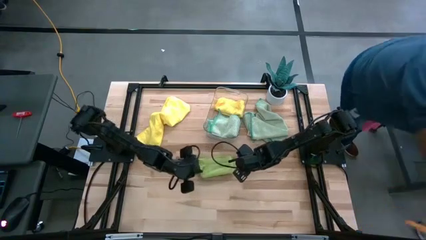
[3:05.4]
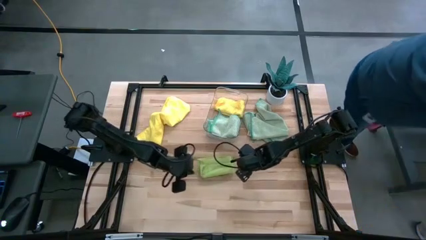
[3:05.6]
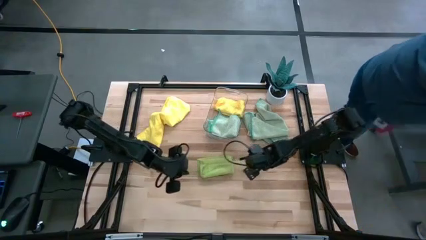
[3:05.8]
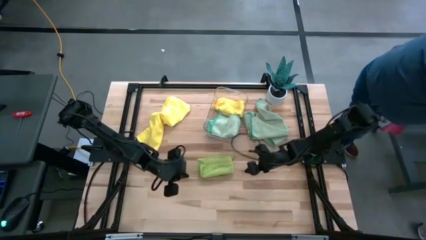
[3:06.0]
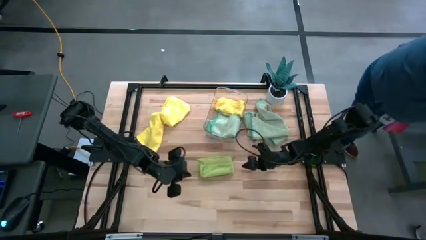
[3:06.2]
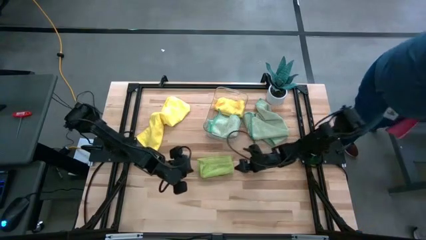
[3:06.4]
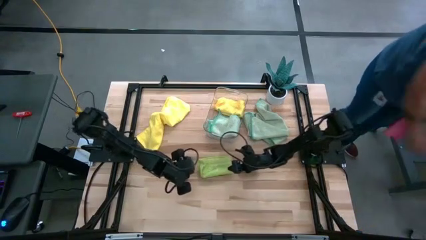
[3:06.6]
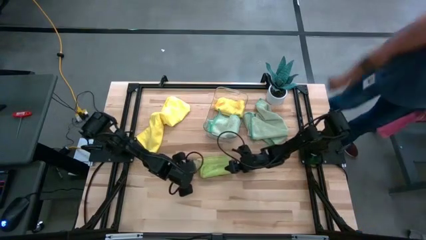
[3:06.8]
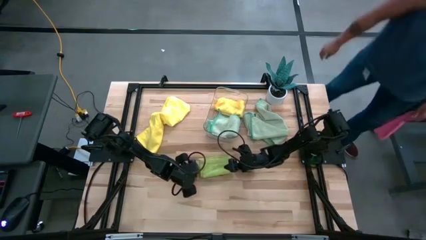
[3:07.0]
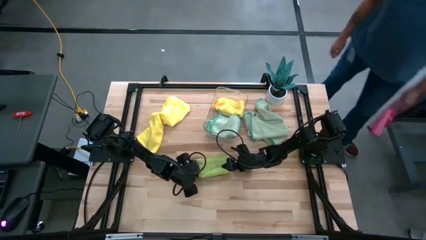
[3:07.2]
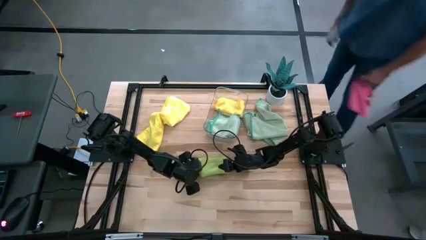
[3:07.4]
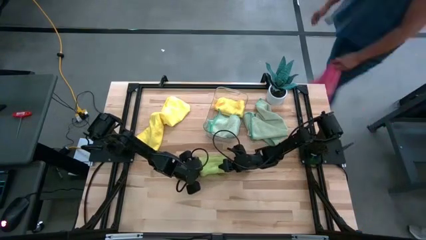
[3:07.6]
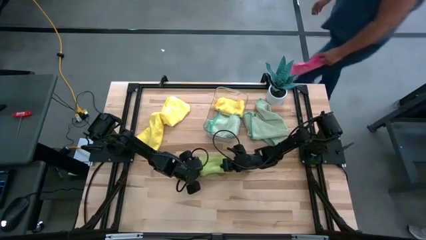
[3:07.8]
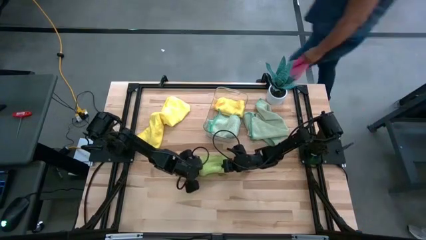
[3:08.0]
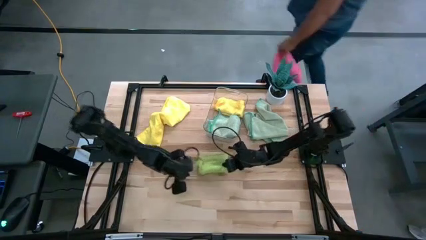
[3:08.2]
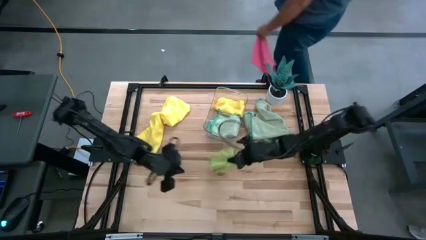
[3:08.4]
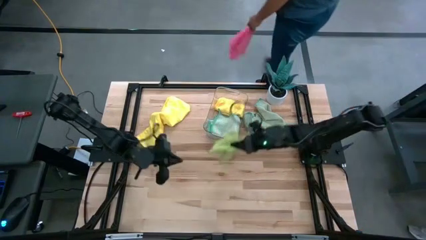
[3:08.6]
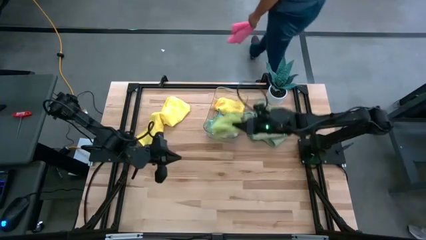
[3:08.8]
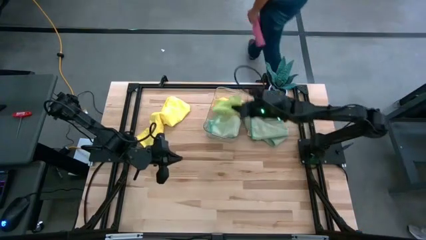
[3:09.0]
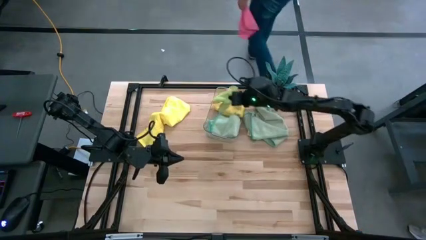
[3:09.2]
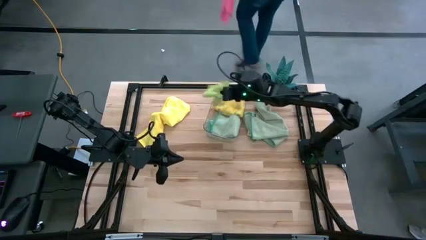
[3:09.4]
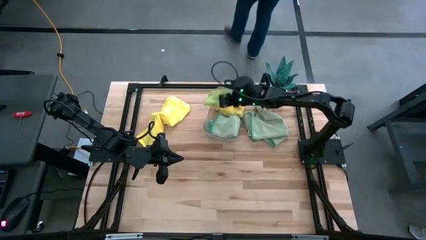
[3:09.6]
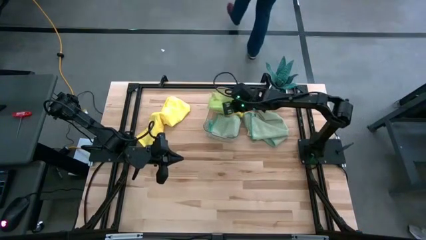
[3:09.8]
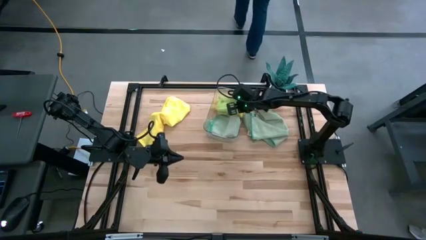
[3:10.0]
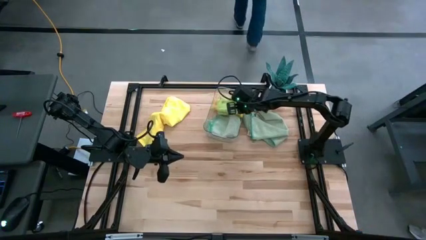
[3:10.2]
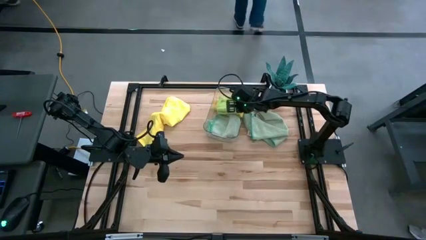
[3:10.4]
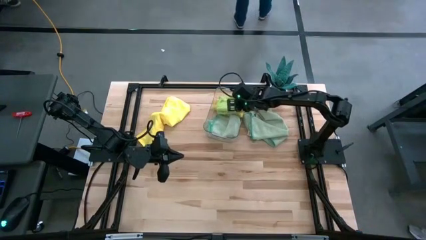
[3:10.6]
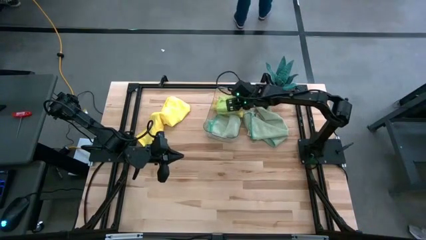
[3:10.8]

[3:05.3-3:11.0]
Task: Fold microfiber towels
Put the folded green towel into the transparent bin

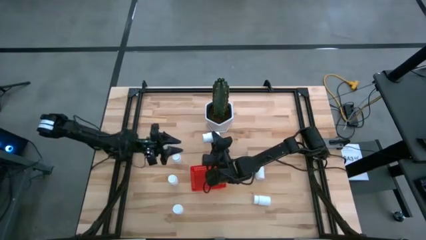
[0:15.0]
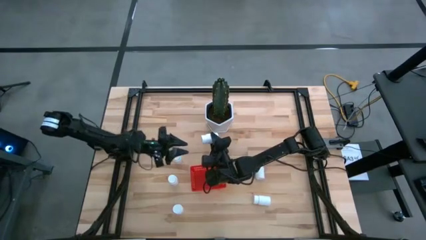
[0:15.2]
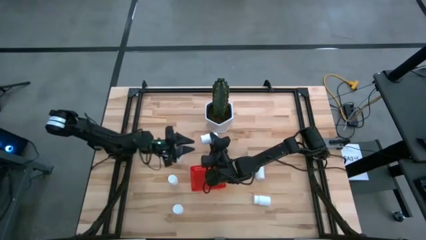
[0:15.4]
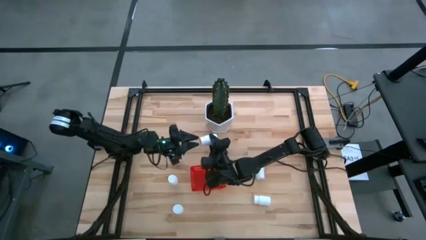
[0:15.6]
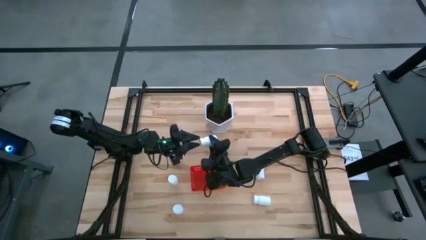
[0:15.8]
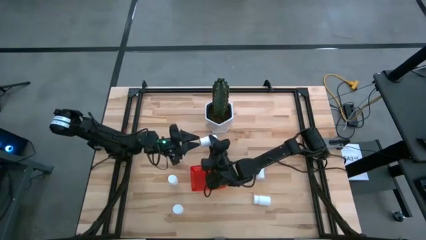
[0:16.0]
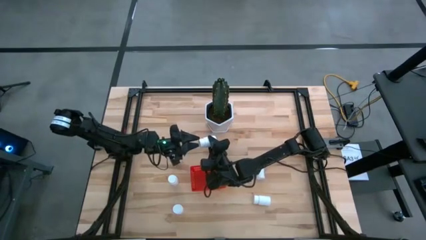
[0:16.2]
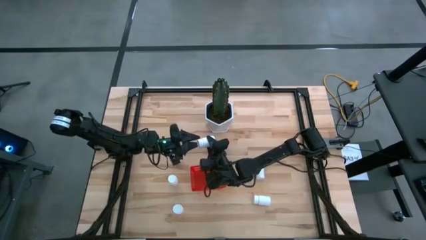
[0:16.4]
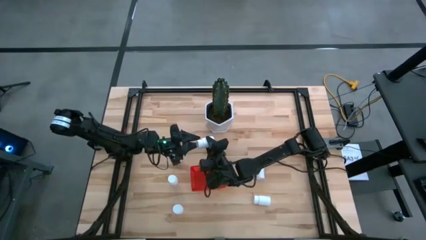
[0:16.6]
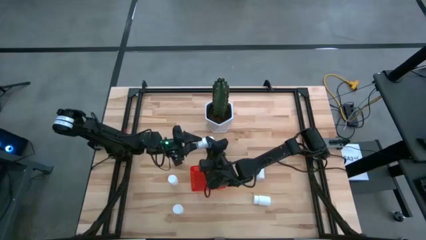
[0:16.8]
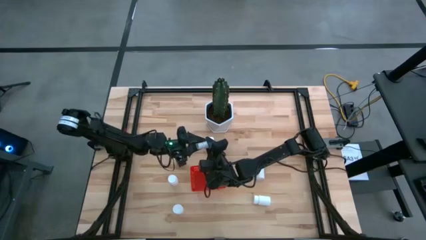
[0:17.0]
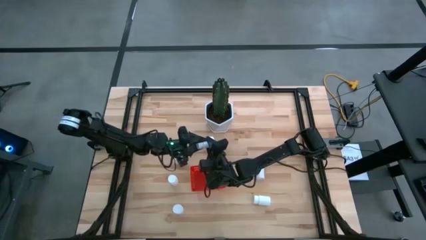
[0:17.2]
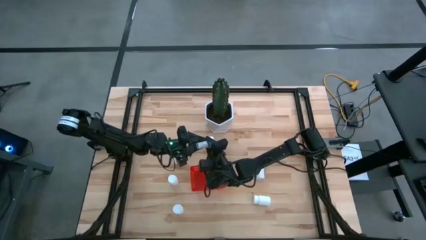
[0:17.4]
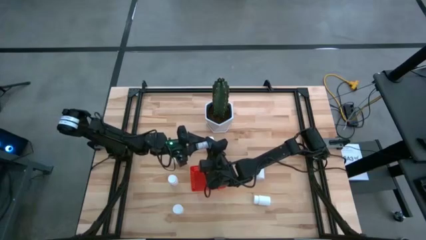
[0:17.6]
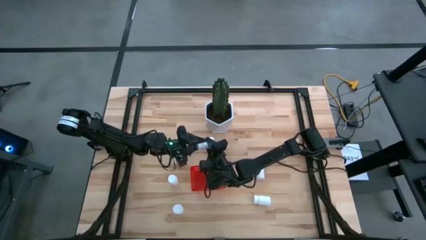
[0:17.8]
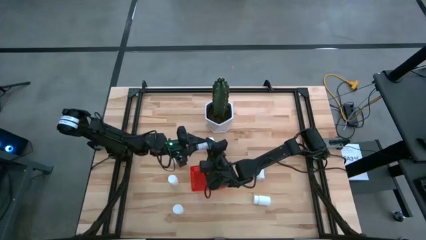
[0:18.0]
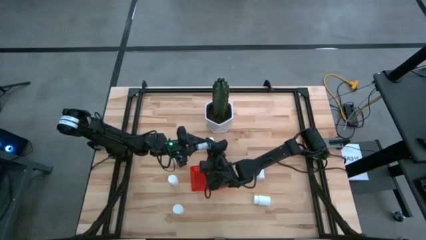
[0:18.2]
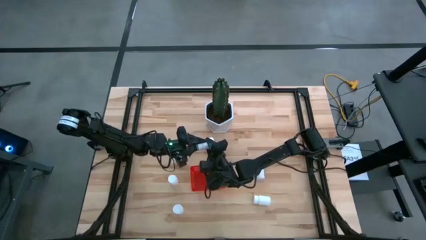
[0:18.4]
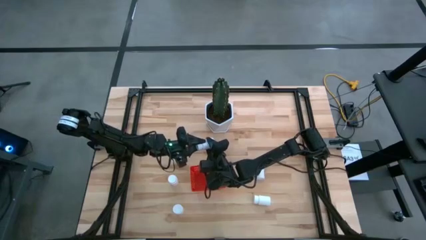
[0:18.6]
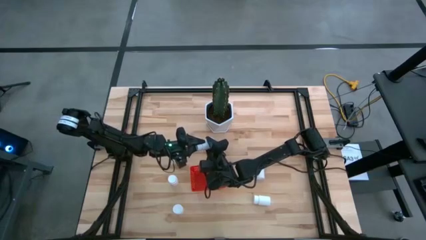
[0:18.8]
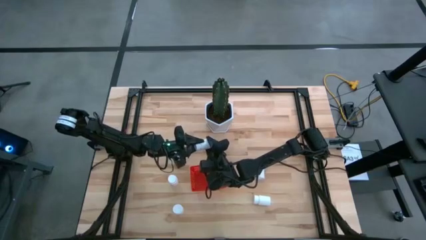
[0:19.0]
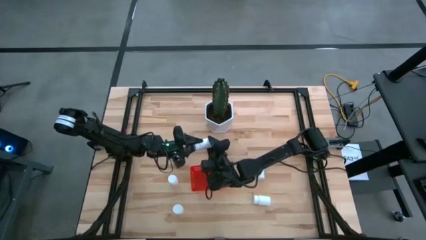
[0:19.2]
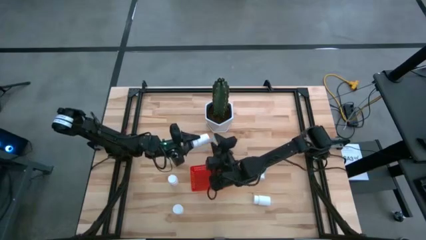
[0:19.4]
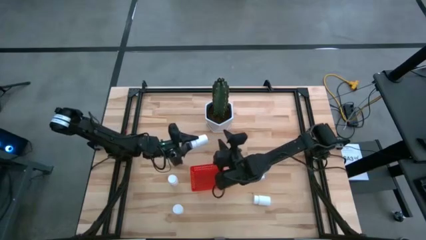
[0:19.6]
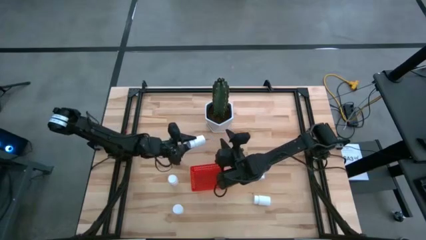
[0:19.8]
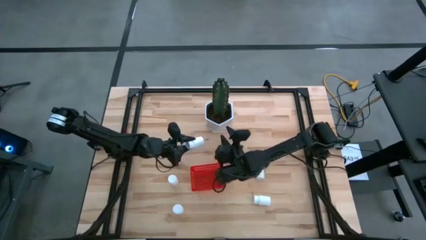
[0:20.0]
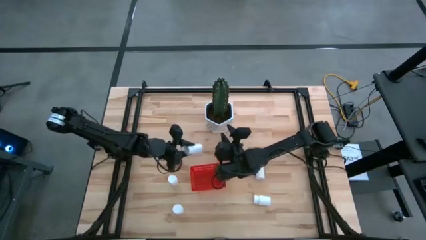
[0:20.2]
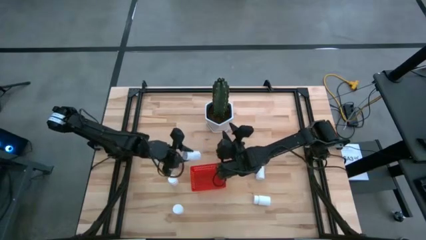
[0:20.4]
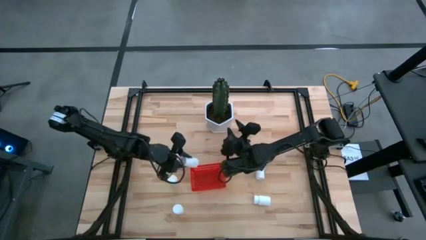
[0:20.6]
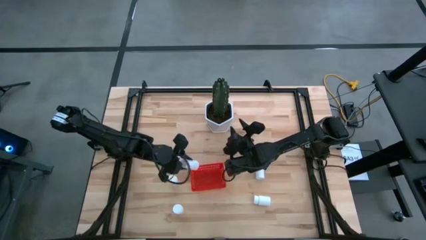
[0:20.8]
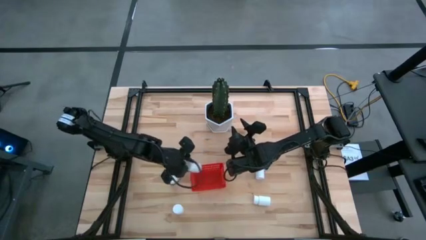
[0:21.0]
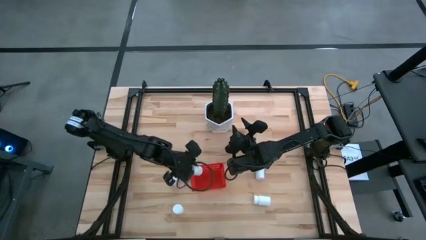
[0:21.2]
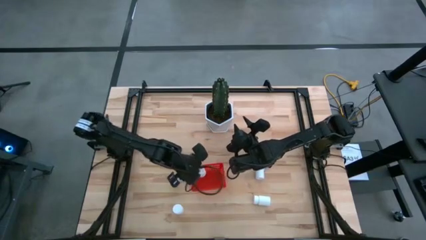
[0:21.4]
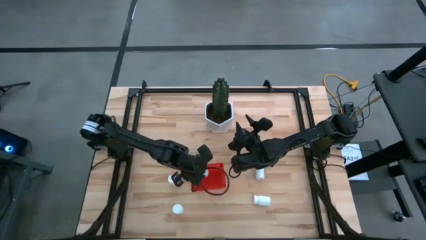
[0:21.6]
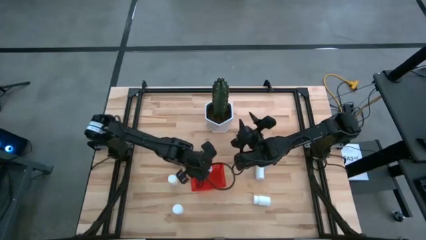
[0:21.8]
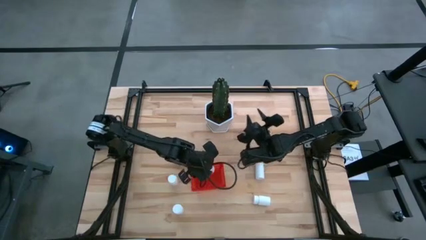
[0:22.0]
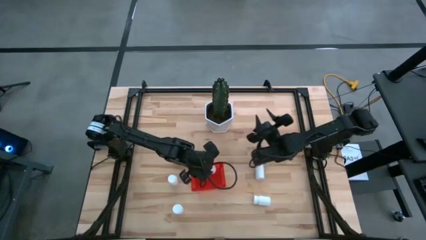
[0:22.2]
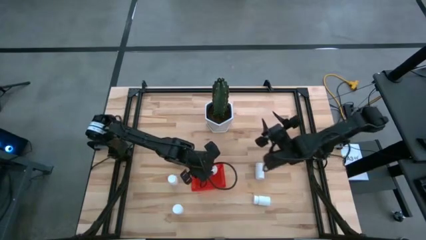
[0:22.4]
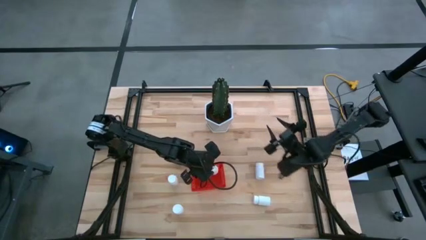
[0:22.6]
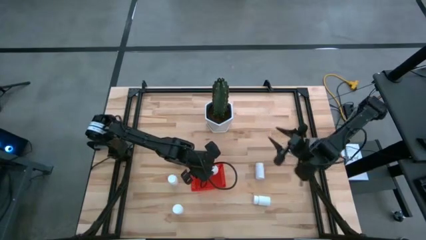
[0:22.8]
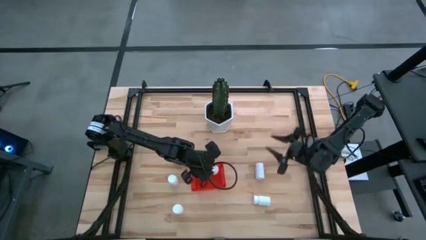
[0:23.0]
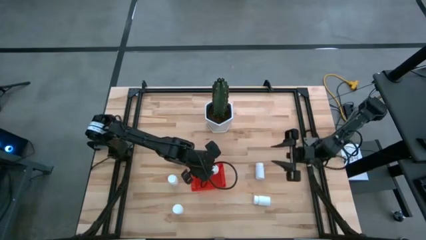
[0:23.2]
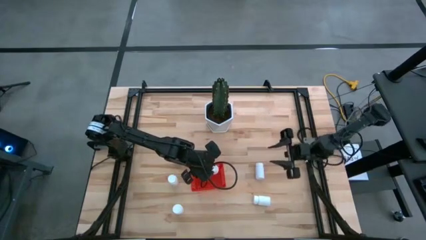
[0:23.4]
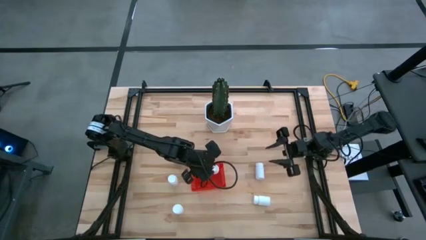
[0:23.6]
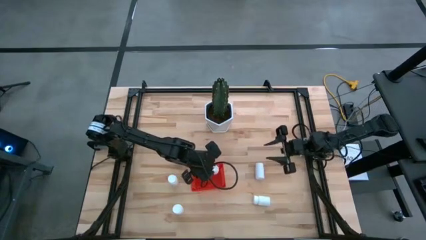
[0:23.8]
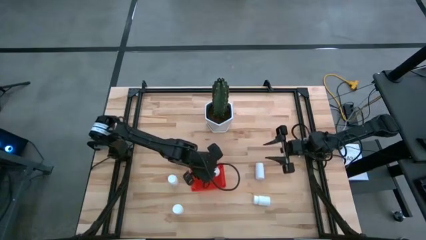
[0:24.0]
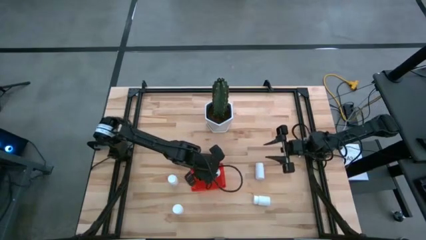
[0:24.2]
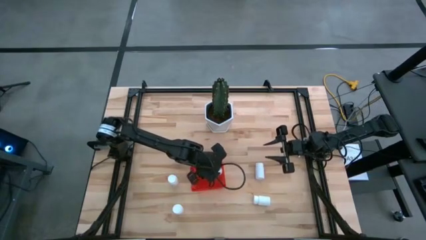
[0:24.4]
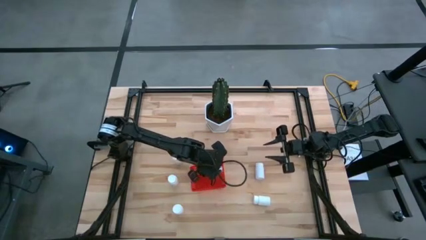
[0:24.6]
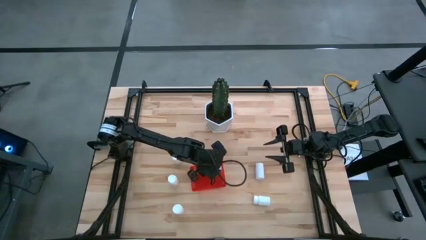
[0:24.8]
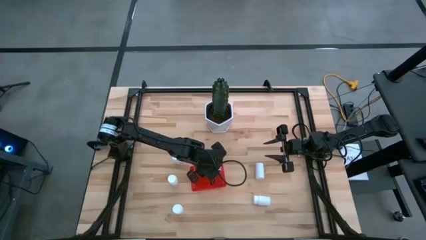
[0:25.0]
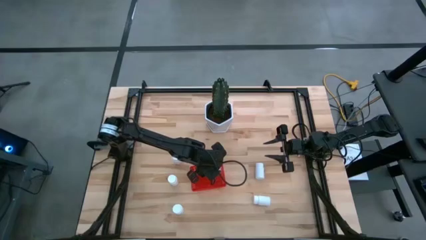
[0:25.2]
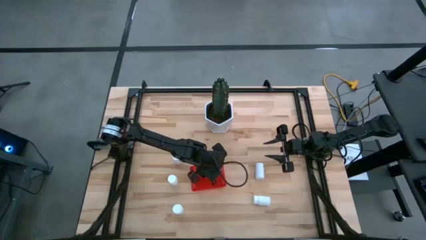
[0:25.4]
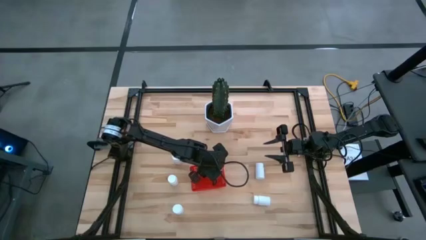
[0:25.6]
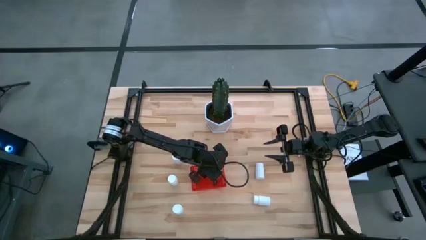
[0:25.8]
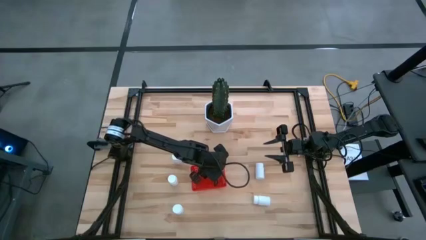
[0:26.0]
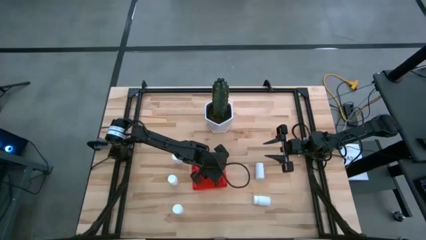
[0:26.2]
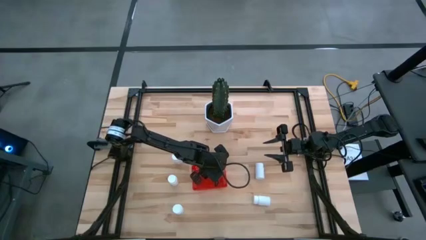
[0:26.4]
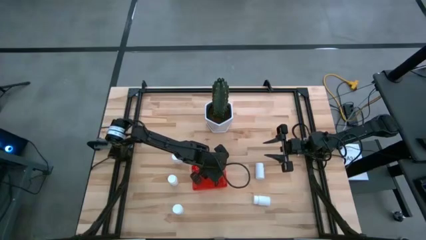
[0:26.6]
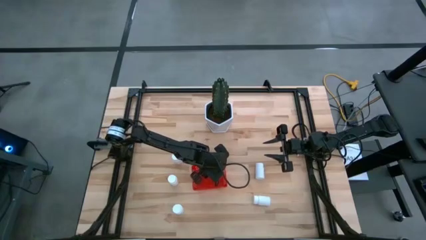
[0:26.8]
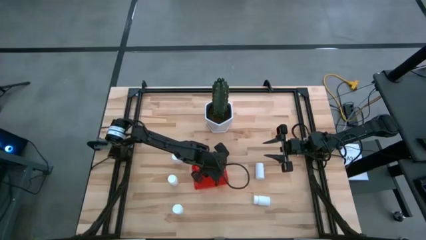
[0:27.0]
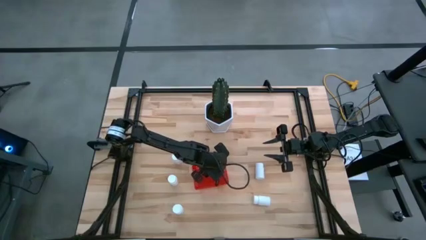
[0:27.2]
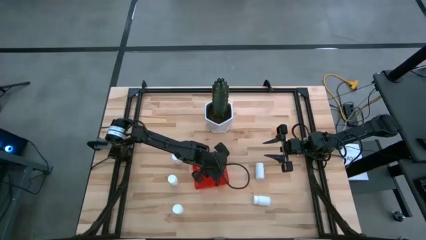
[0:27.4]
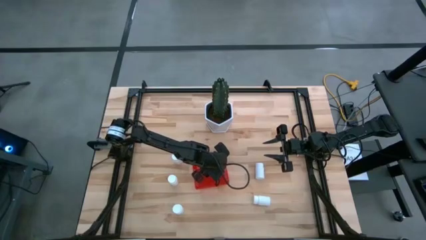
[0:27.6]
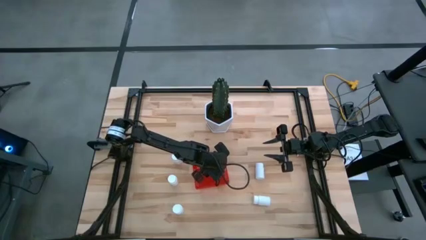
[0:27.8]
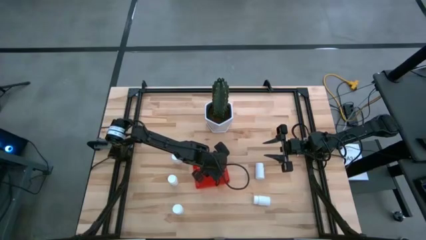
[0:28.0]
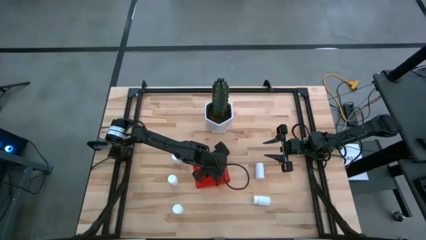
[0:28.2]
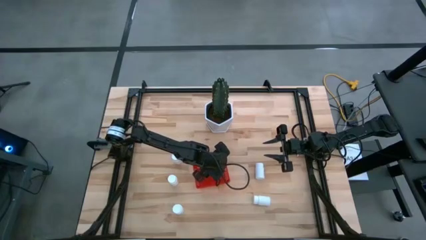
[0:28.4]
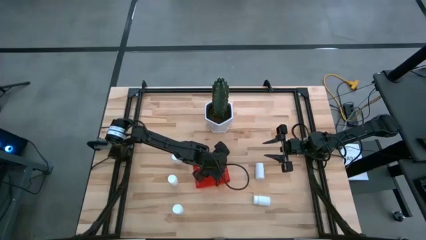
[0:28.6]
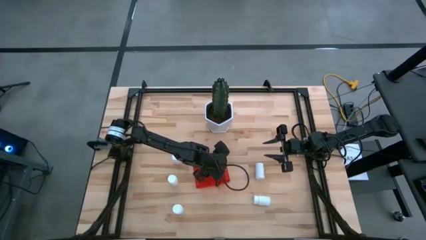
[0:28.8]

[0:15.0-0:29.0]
Task: Pick and place pill bottles into a basket
Put the white pill bottle into the red bin
